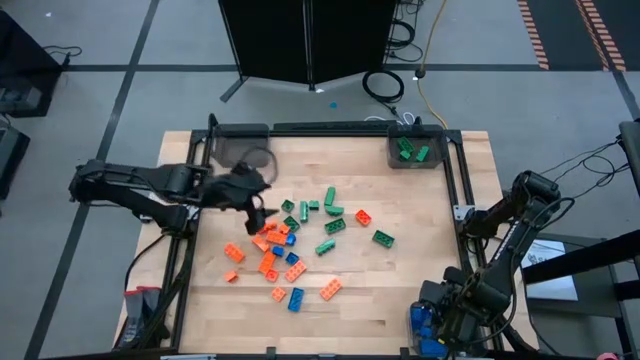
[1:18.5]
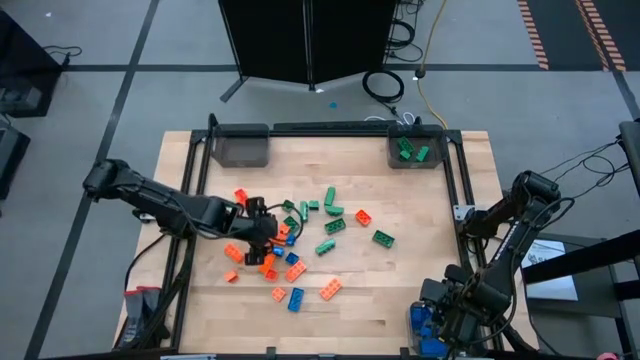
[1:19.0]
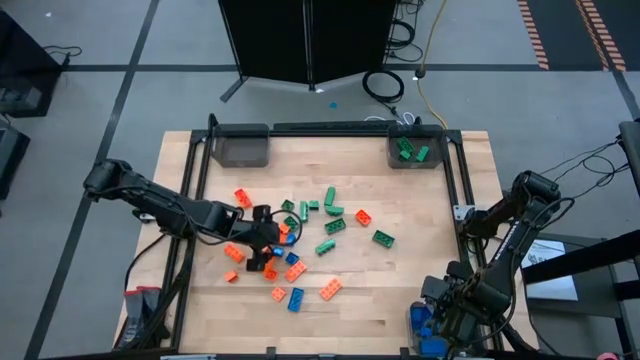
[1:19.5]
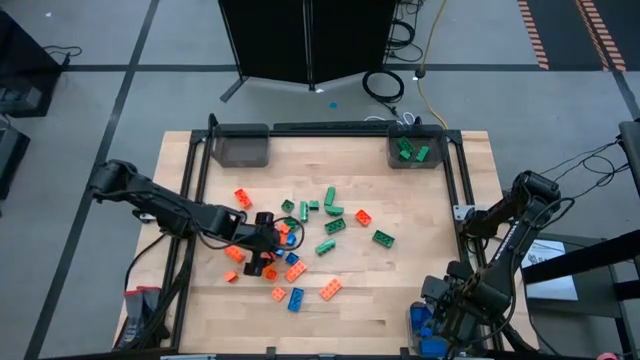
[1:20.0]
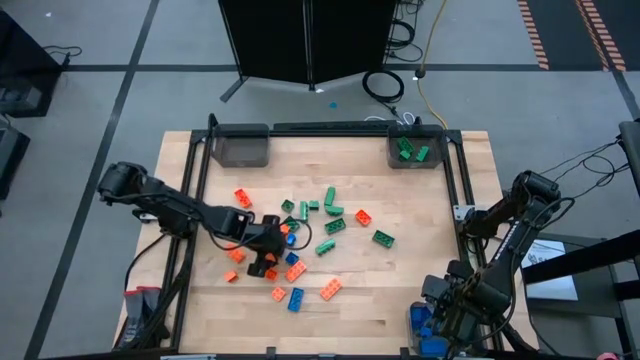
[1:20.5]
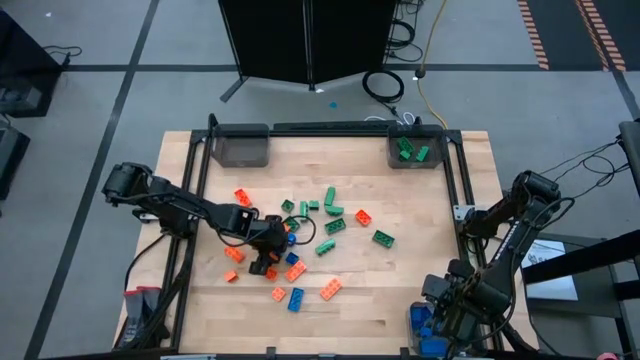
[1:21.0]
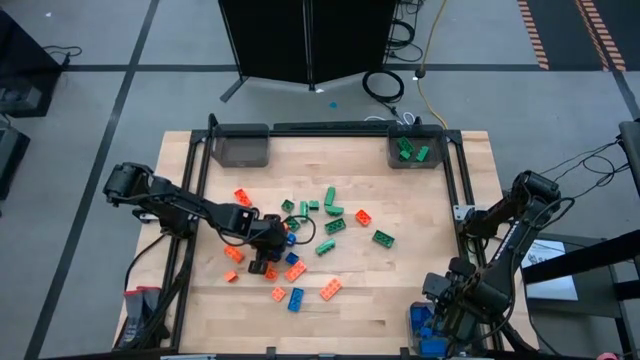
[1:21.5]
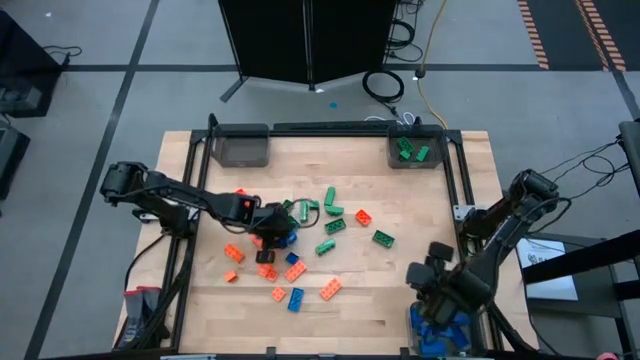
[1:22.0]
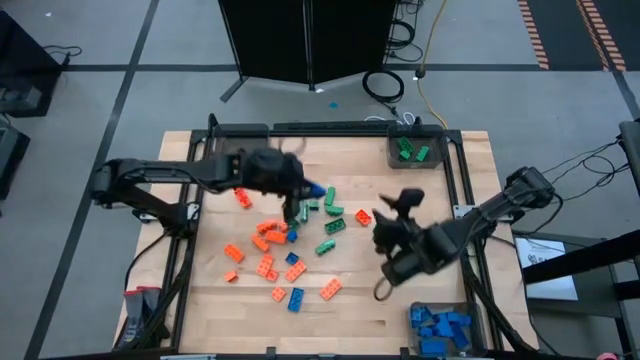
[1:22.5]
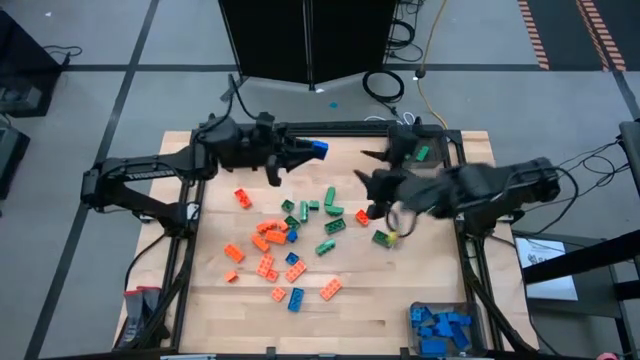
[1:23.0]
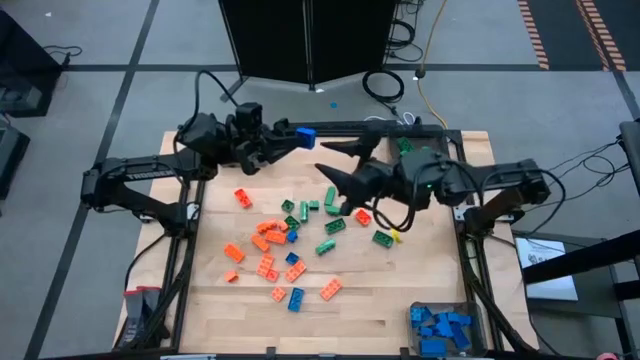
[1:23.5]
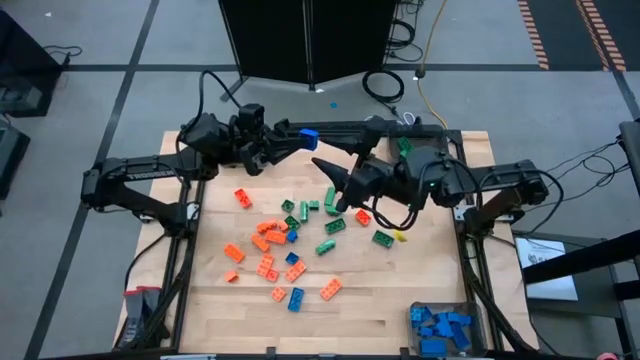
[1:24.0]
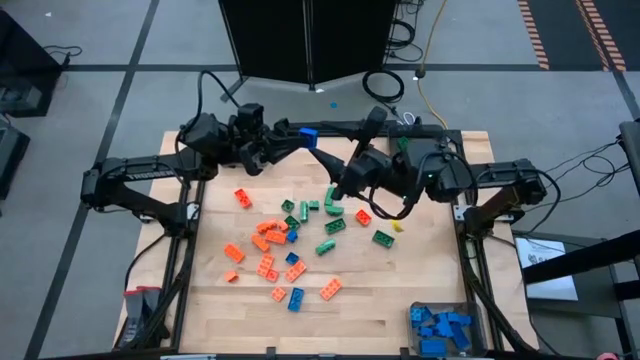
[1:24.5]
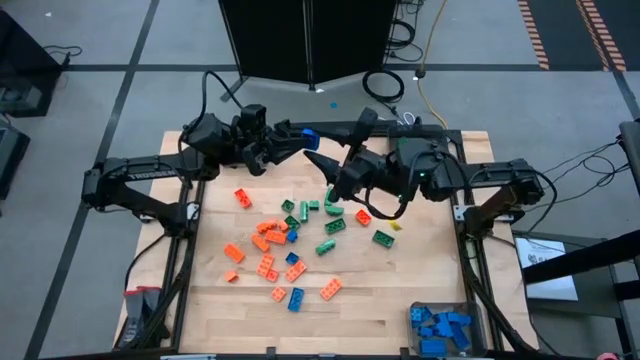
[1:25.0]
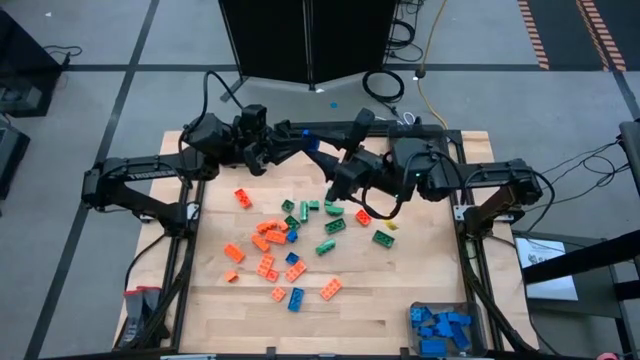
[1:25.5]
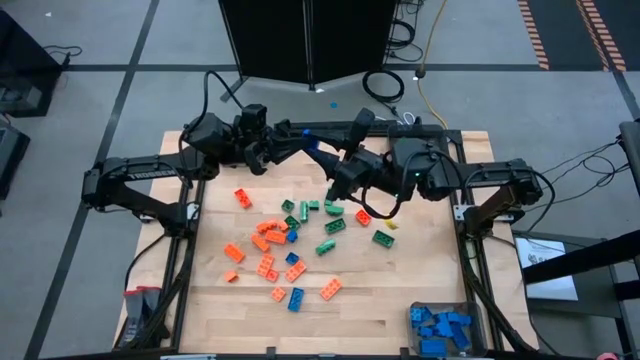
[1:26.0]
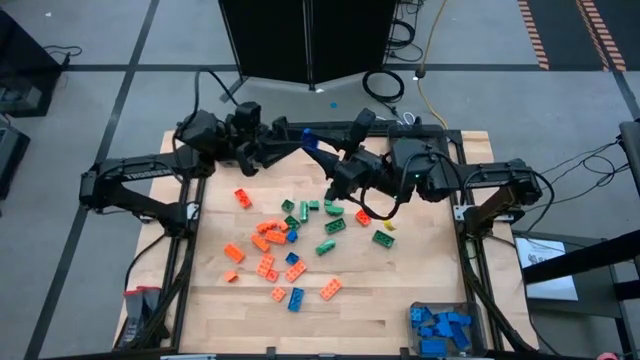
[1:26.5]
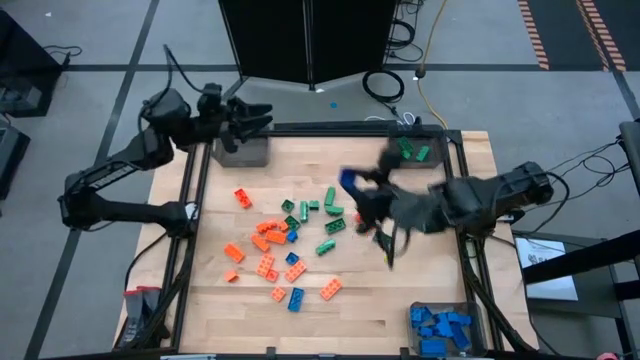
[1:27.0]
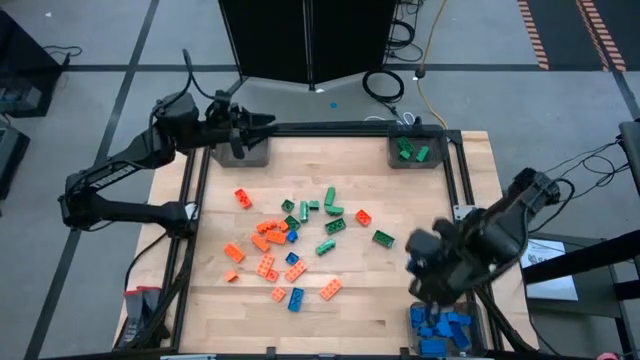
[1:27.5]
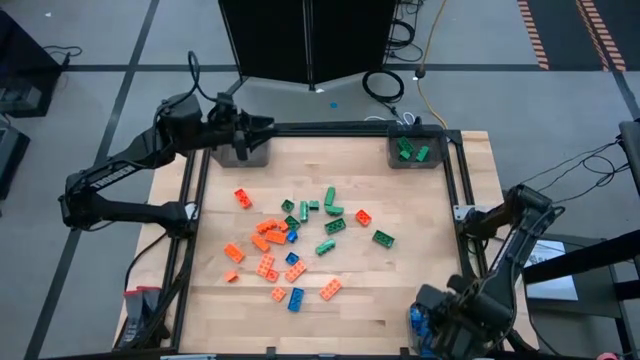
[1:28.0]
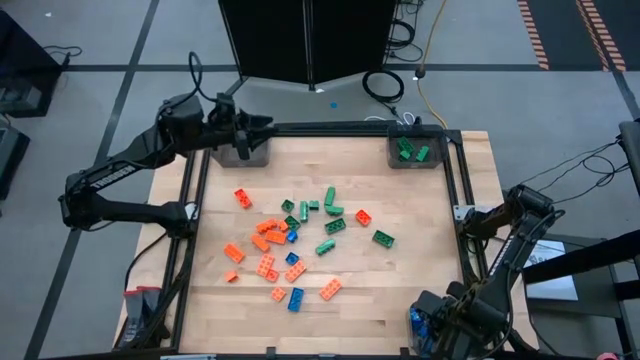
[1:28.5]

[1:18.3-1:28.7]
Task: Sort blocks
Put the blue game piece into the bottom black bin

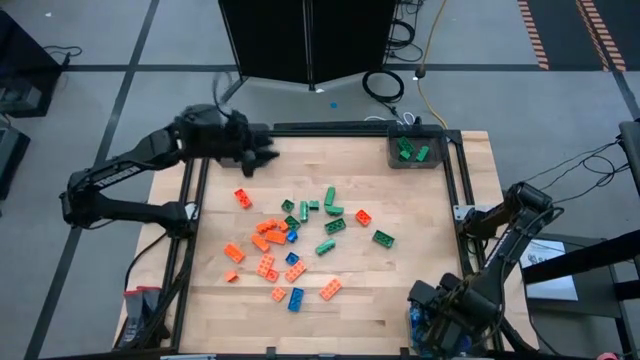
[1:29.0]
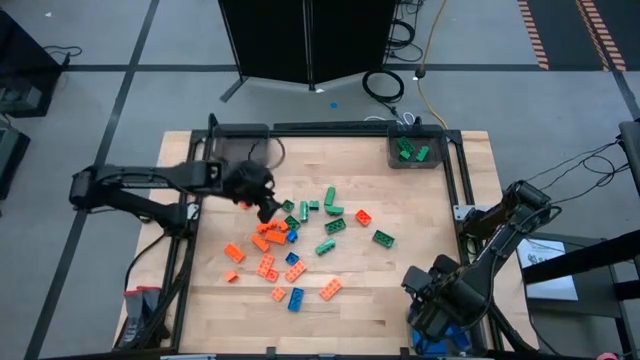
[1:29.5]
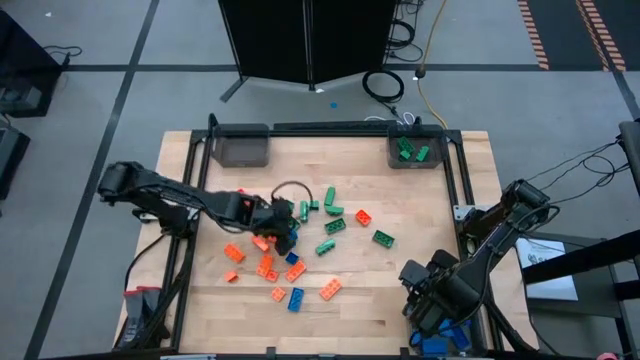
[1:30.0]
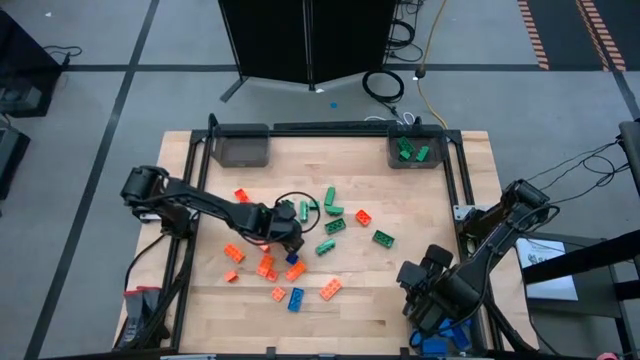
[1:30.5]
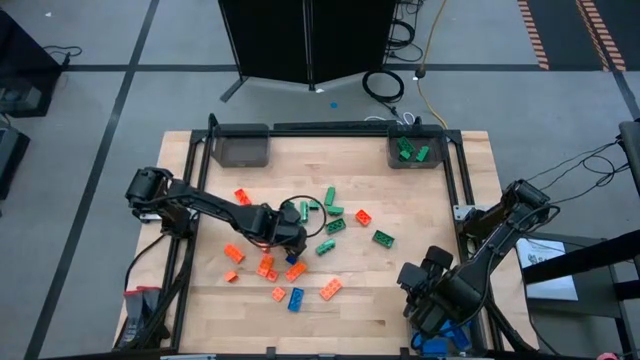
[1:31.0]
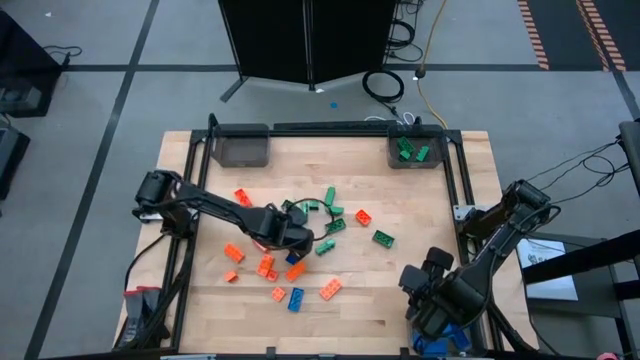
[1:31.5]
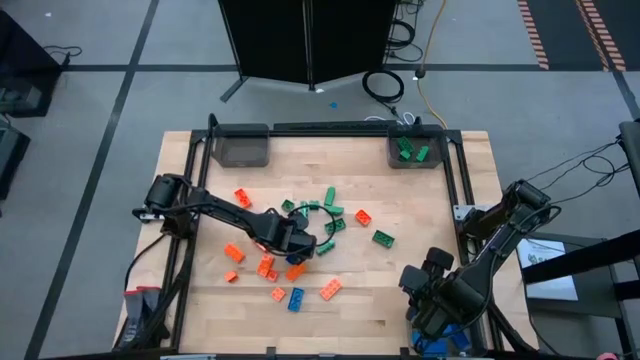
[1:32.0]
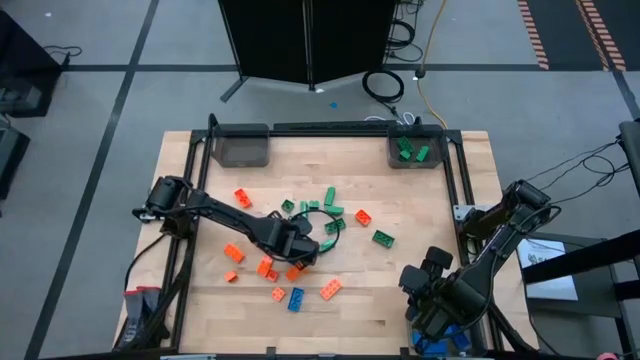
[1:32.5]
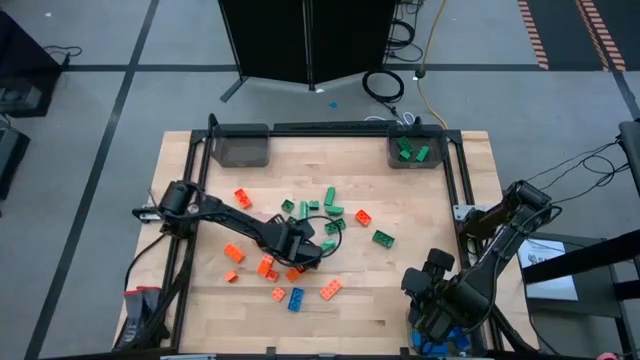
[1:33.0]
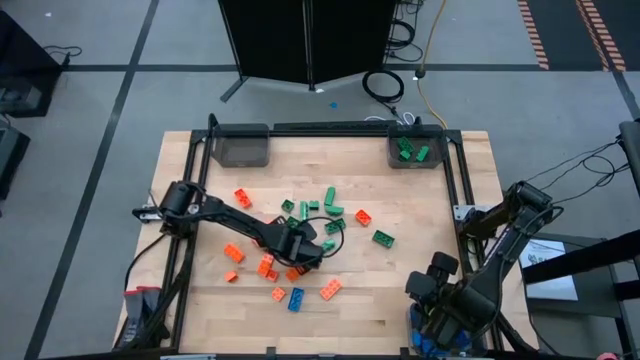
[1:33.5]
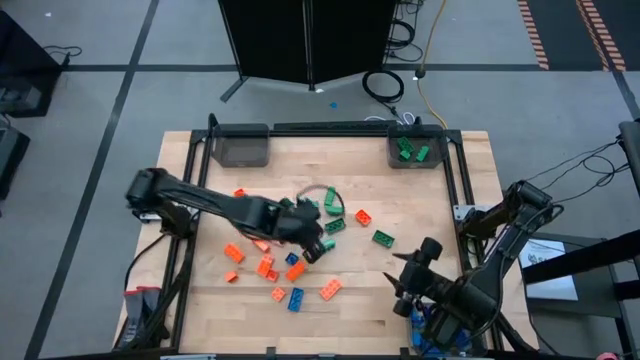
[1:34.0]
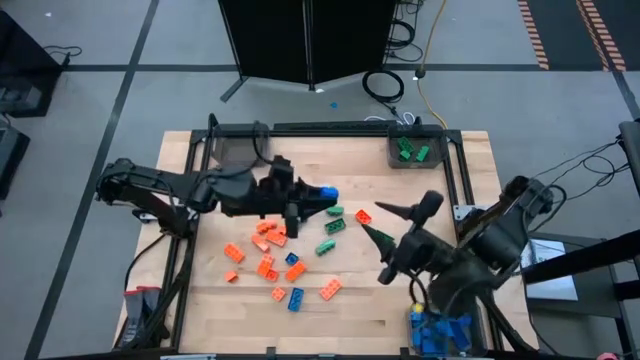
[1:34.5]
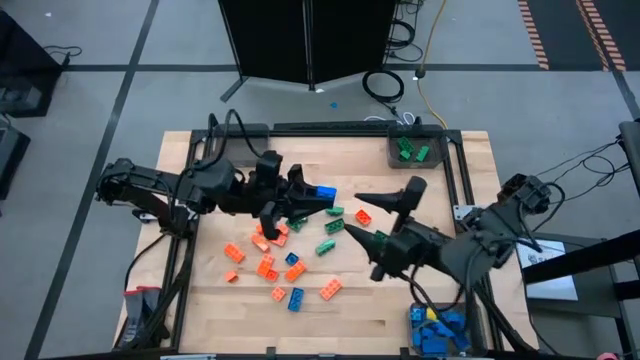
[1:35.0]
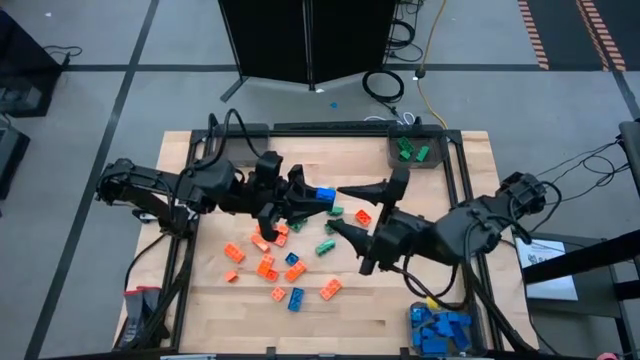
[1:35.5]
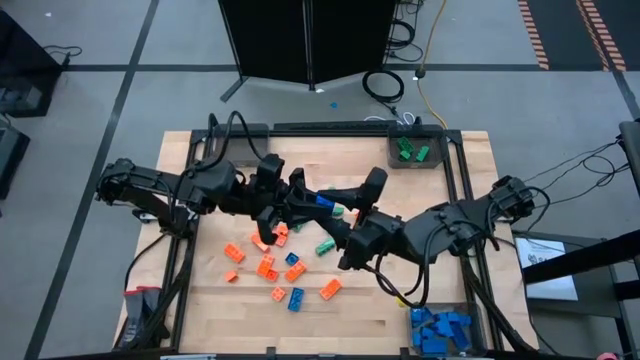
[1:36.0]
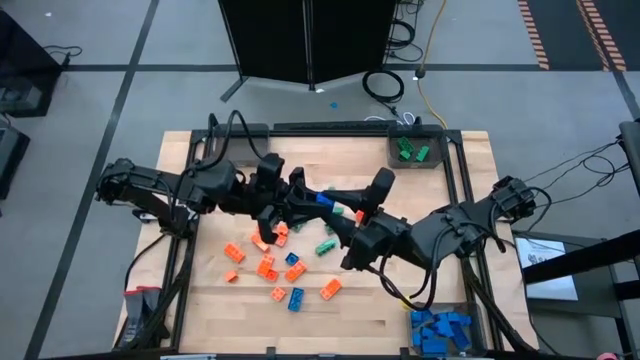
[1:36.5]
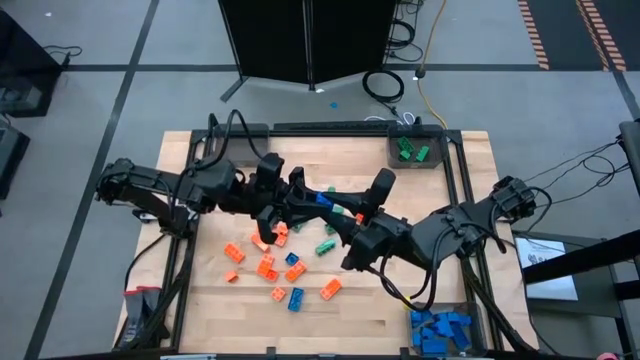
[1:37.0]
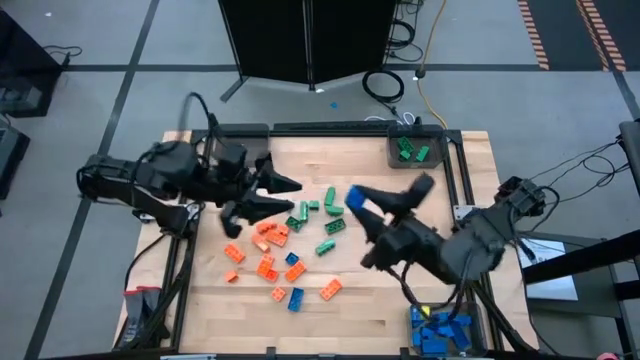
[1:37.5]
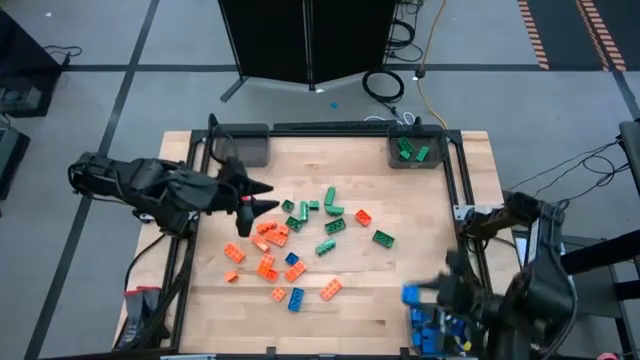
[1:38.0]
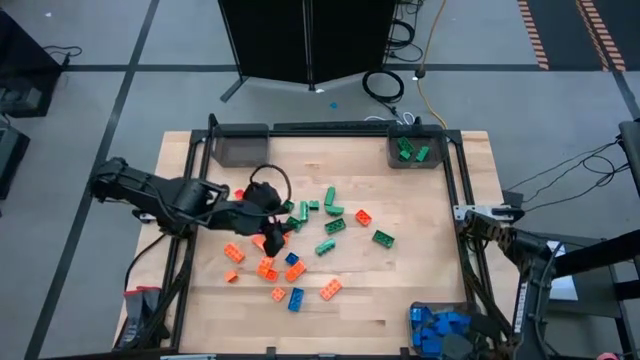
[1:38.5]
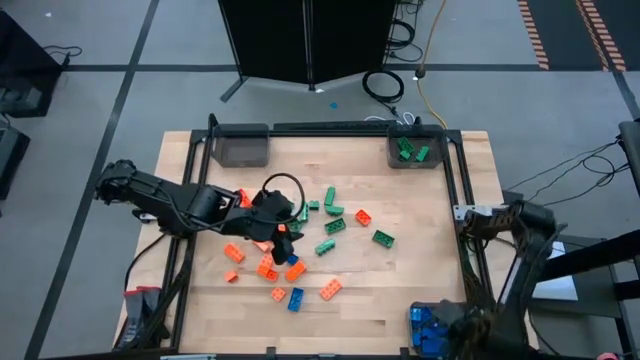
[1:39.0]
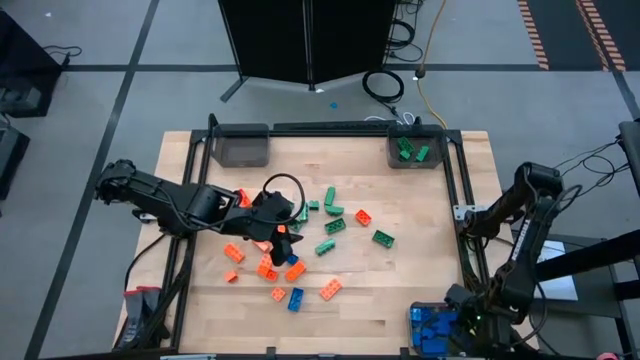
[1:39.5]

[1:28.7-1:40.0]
Put the blue game piece into the bottom black bin
